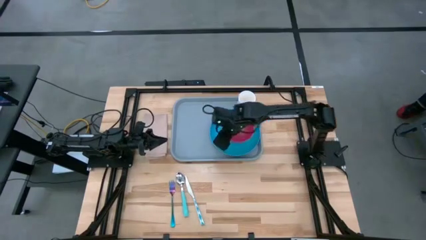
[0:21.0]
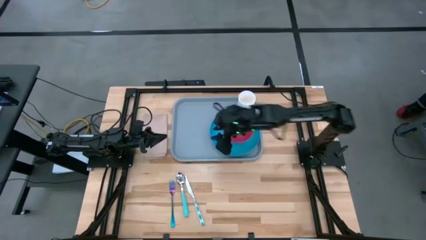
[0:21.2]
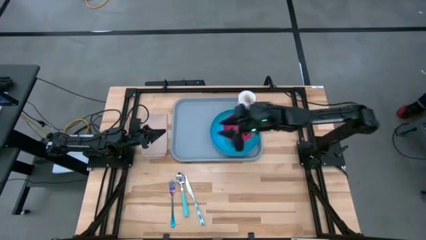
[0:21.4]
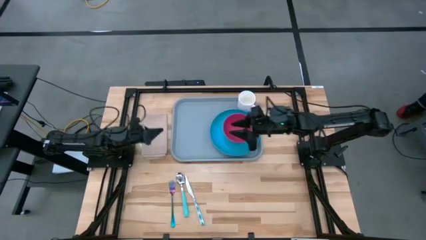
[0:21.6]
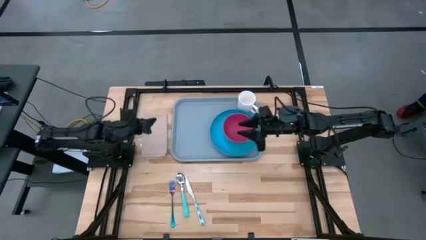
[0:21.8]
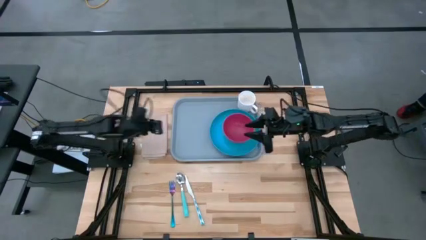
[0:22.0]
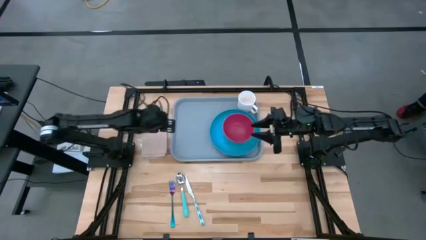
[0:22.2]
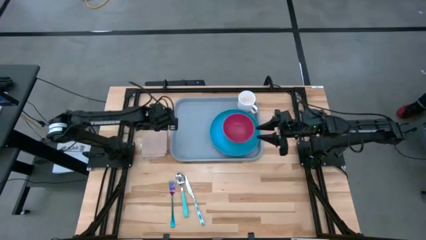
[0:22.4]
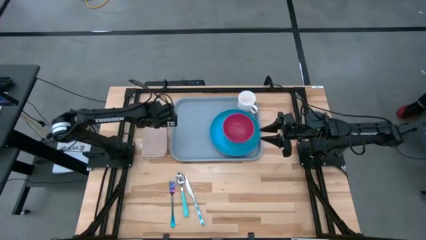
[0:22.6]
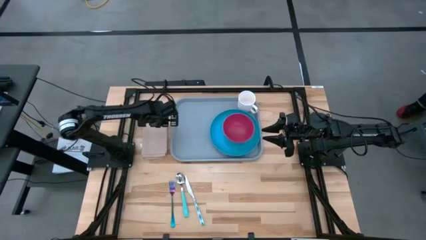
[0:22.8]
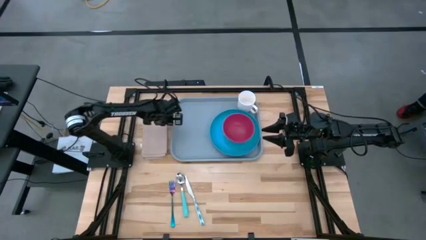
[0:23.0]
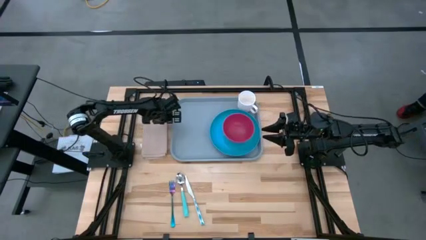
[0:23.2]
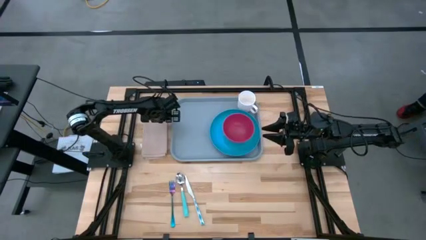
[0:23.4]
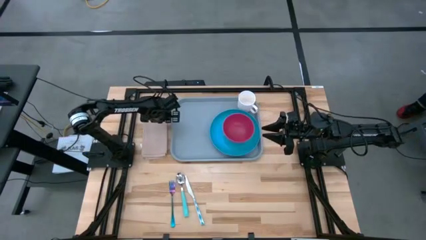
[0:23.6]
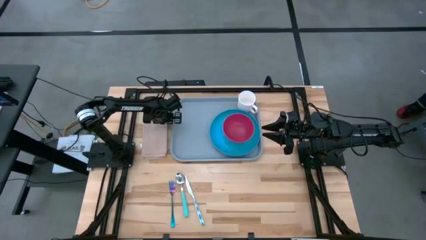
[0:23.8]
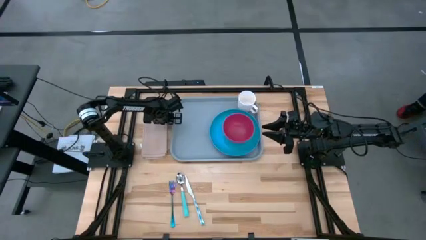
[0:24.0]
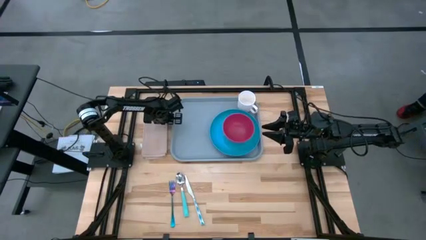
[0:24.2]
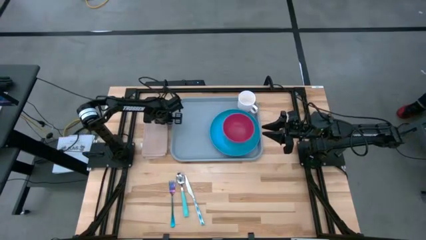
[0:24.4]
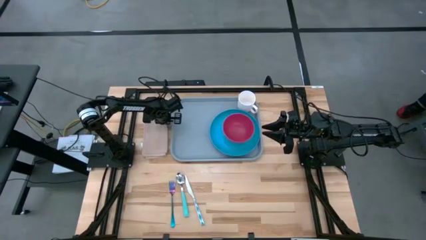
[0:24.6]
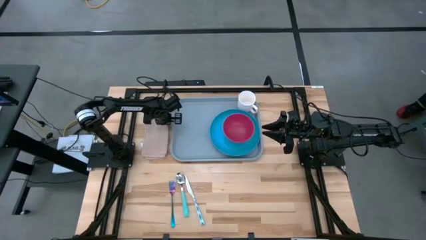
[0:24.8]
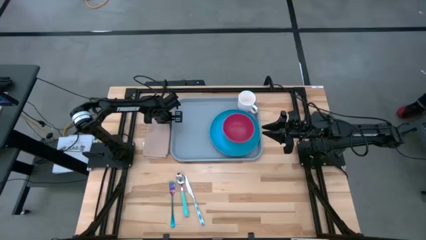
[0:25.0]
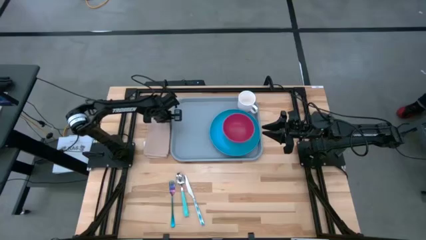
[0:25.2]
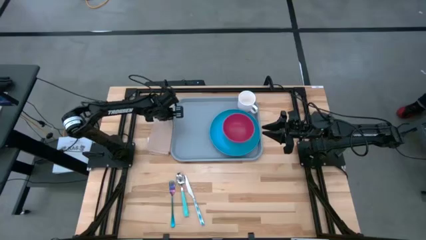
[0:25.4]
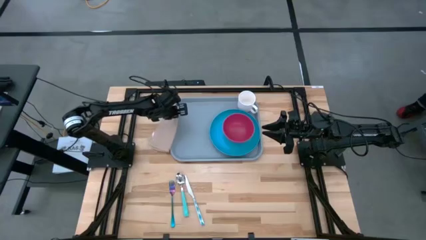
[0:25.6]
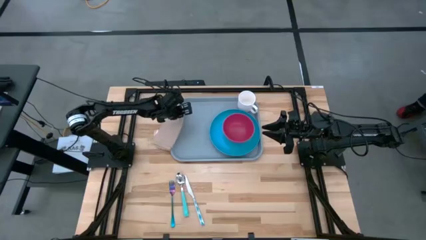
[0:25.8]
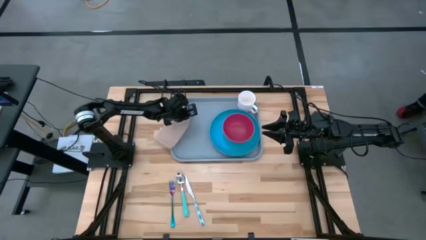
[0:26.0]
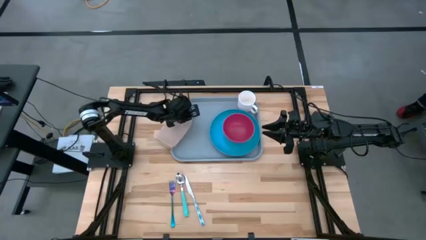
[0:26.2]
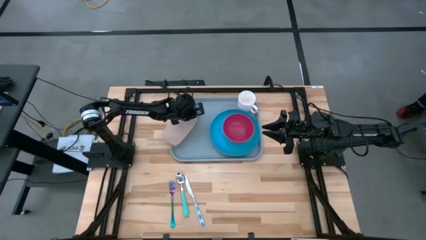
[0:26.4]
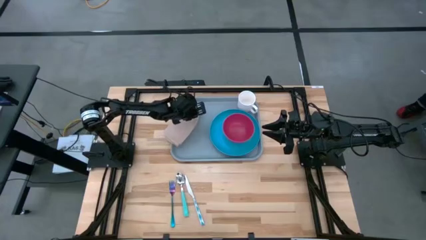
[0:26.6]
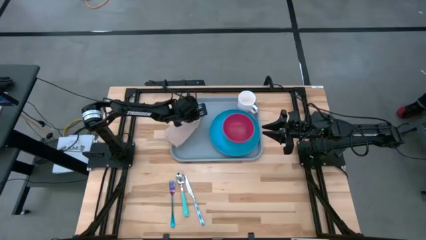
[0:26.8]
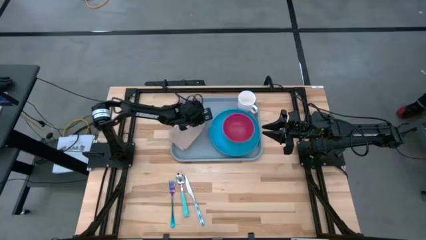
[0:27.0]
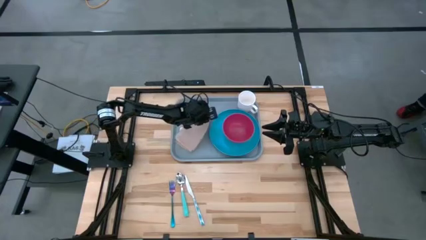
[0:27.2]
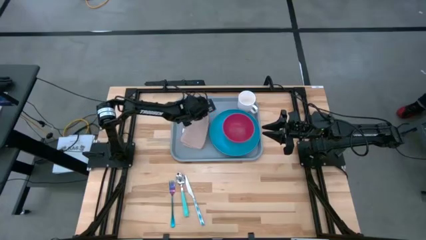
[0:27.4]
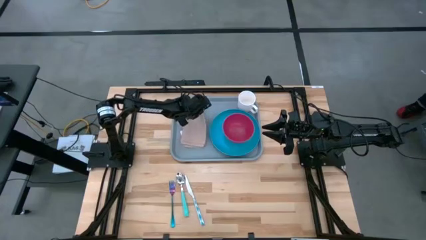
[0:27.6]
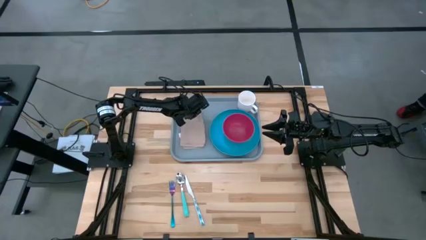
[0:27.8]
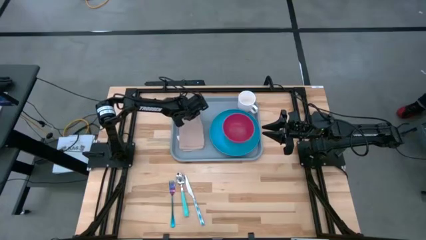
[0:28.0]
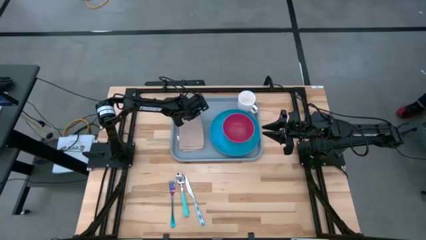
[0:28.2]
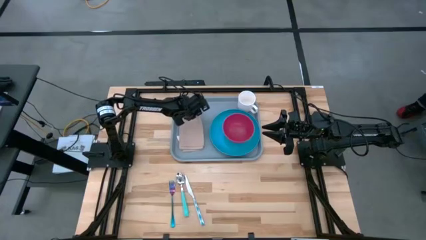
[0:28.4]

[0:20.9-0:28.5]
Task: Set up tray
Put the gray napkin on the left of the blue tray

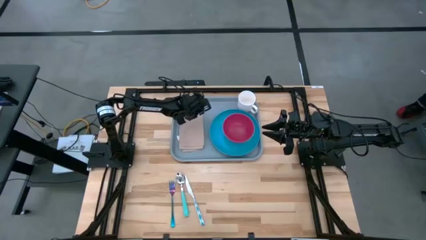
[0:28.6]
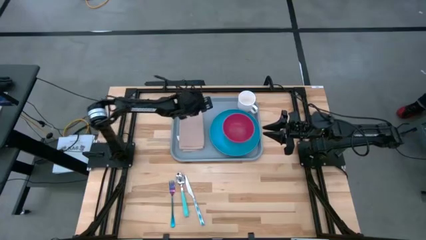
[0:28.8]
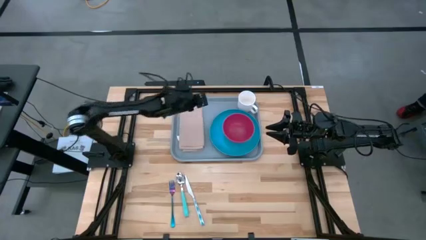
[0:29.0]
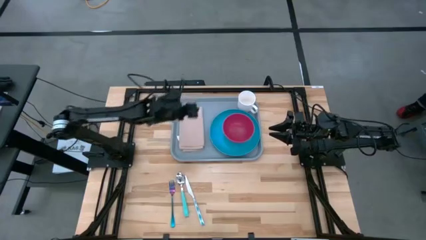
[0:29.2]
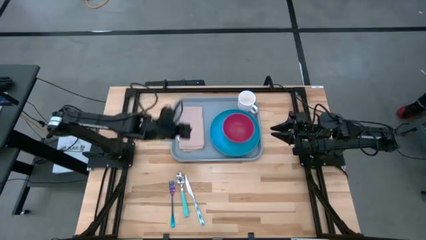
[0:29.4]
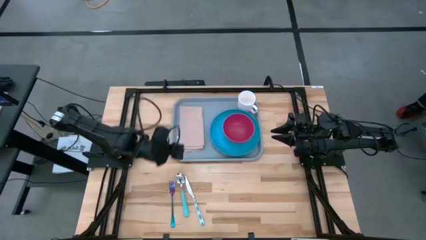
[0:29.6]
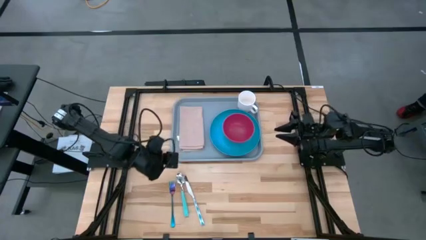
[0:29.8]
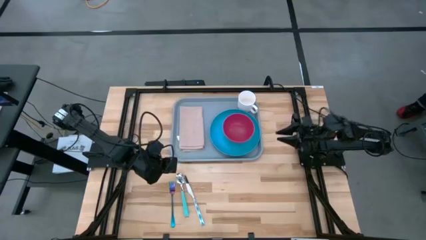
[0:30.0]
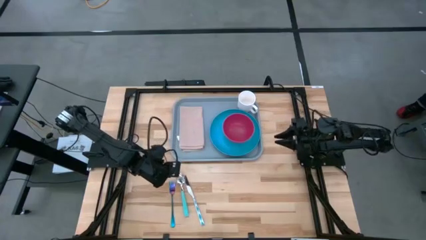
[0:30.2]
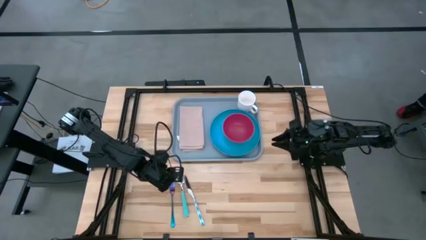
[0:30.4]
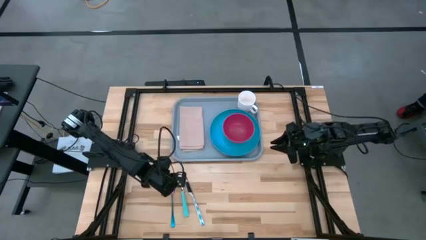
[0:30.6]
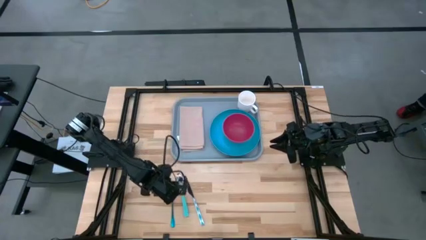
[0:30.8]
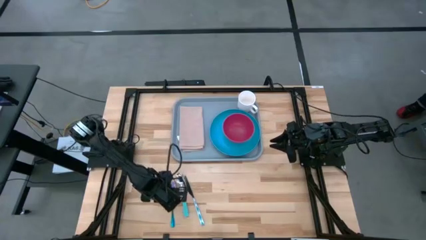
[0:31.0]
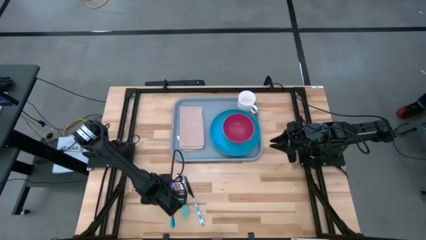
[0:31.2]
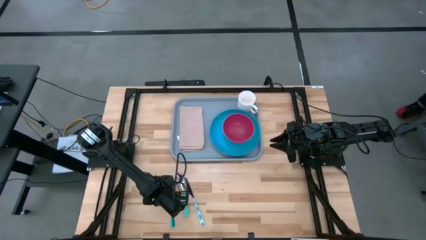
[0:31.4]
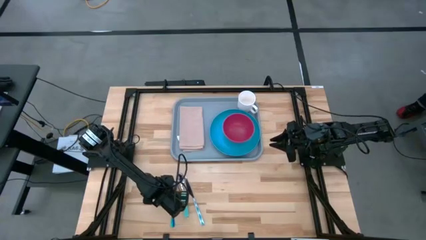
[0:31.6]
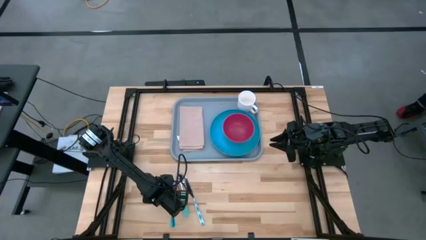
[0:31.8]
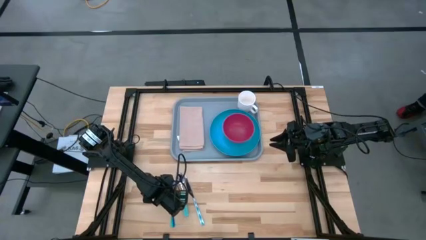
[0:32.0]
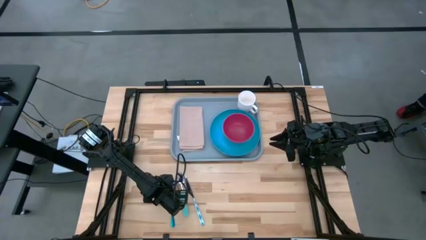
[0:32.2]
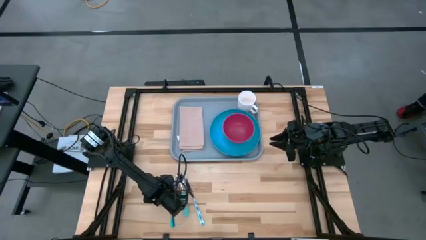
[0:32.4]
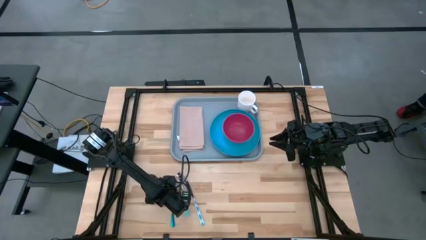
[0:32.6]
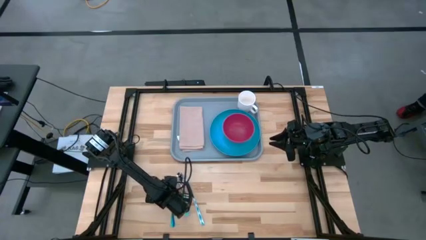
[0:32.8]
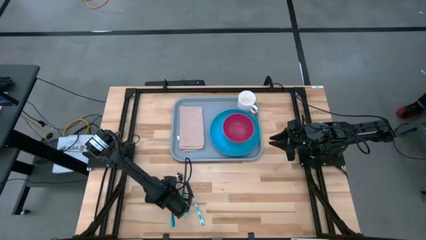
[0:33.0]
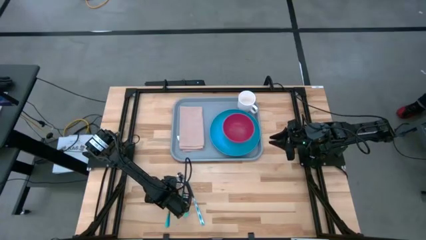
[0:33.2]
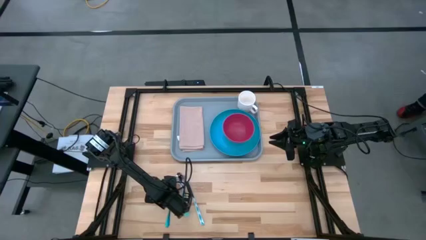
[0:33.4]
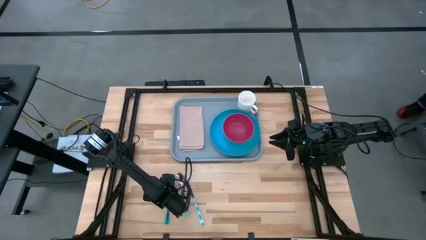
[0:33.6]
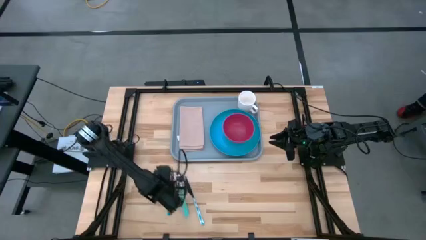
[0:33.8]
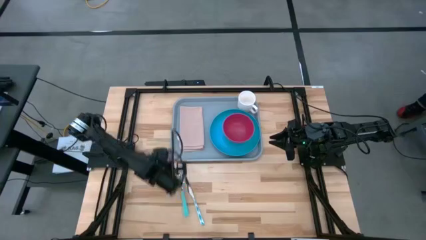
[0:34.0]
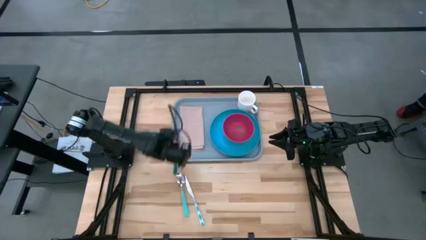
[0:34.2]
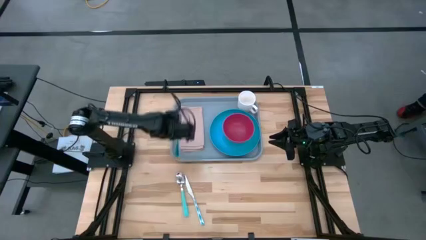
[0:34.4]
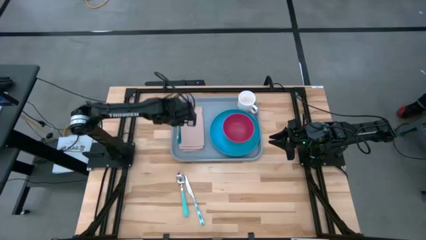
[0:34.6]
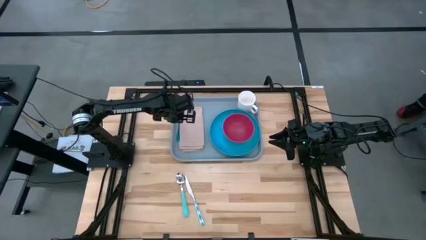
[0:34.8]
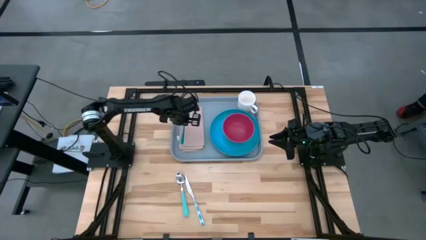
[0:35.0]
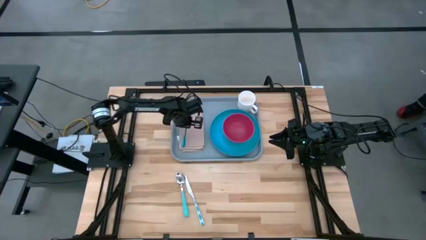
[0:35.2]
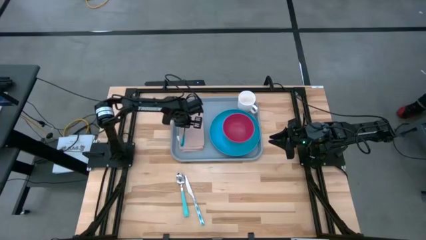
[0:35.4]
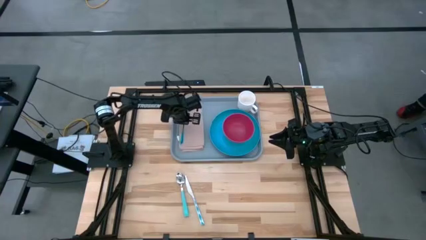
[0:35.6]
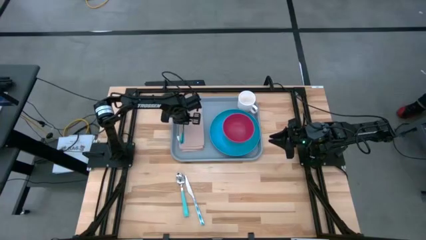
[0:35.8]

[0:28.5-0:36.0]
Put the blue fork on the gray napkin on the blue tray

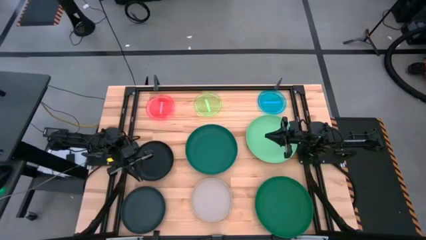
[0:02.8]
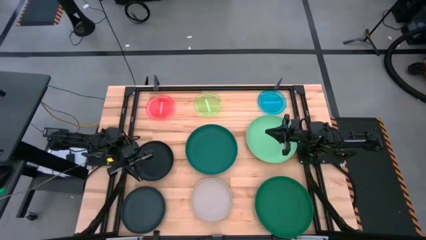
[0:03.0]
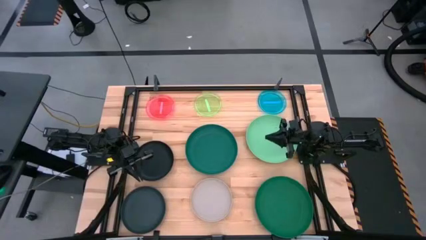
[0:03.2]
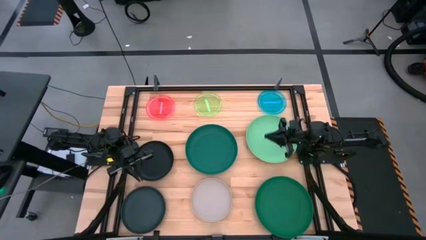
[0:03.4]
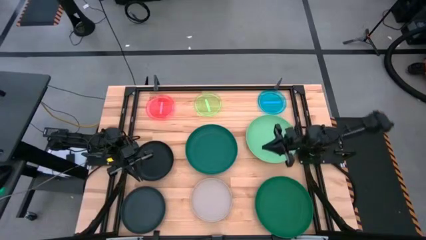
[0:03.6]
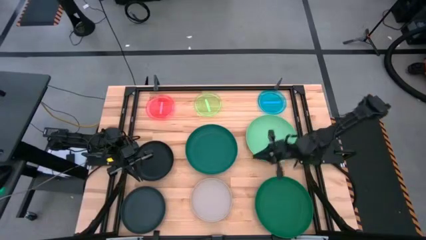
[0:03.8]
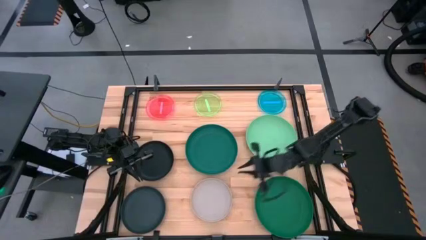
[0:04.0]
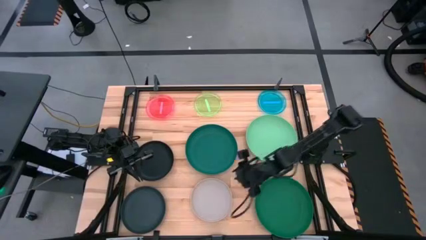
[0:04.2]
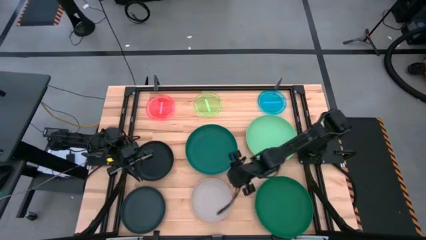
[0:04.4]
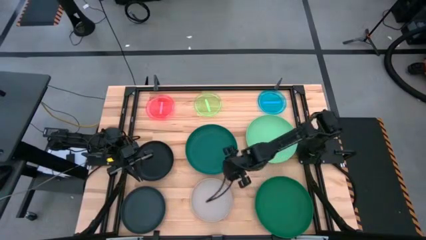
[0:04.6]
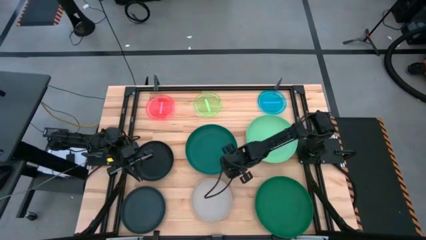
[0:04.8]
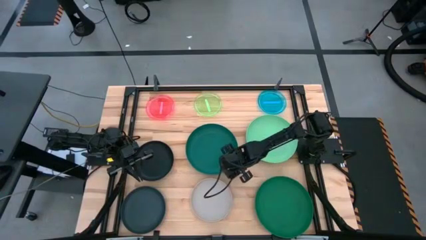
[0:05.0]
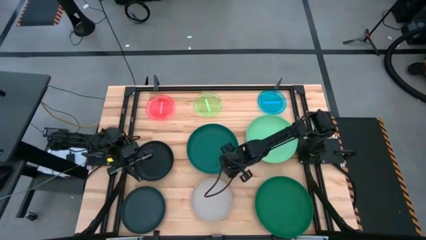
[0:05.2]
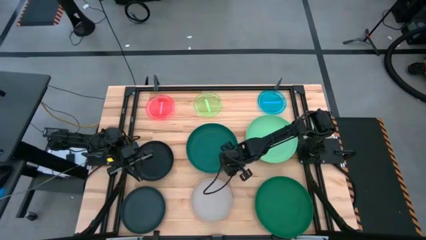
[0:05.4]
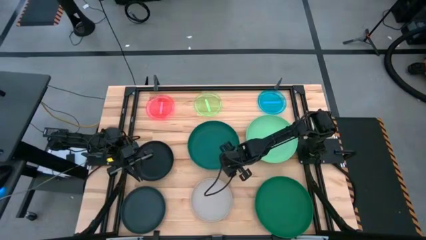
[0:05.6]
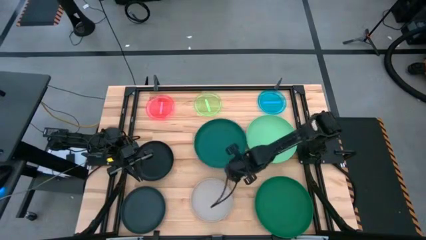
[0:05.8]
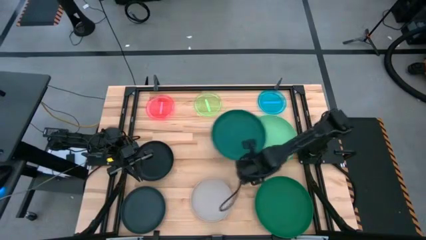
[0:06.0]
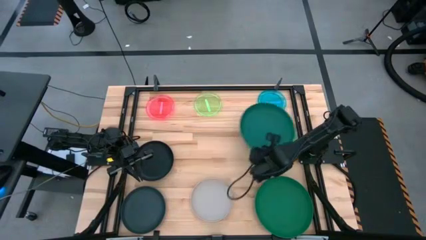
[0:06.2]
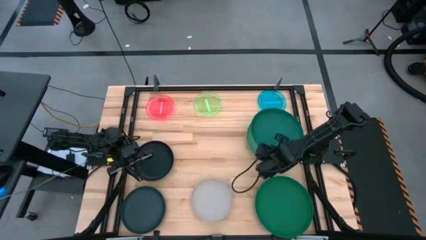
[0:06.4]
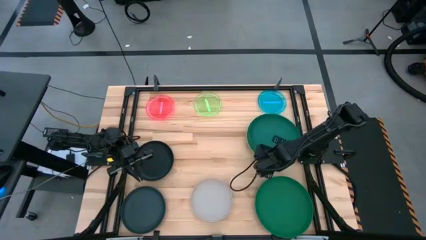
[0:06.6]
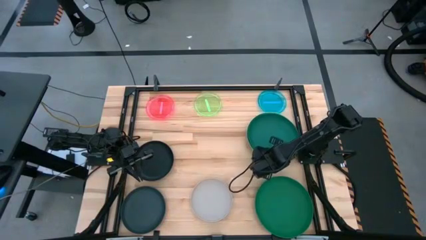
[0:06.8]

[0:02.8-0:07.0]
Task: Stack plastic plates
Stack the dark green plate on the light green plate
